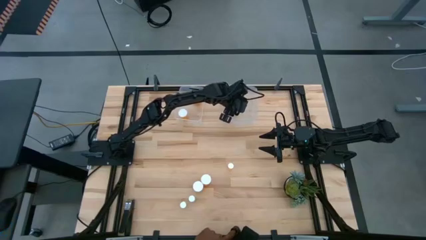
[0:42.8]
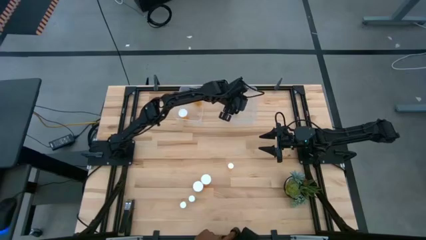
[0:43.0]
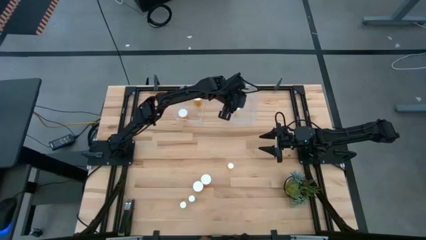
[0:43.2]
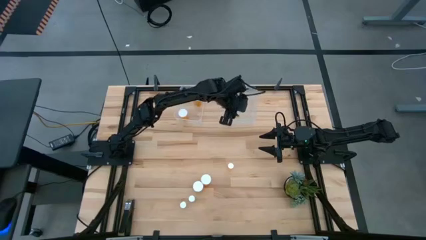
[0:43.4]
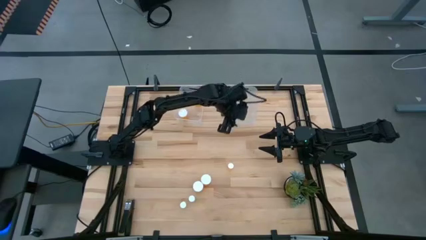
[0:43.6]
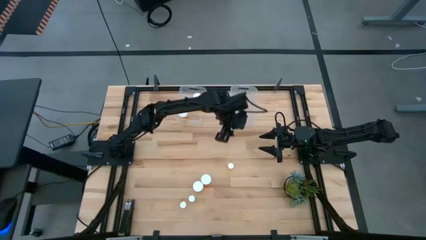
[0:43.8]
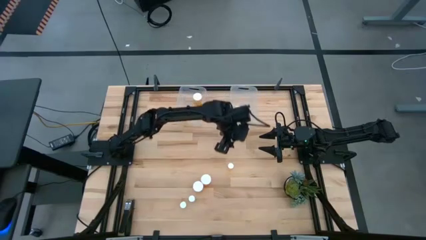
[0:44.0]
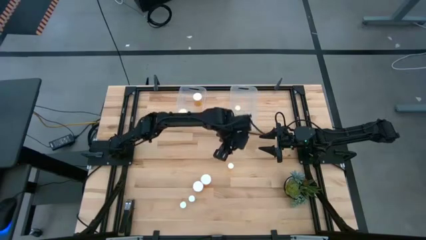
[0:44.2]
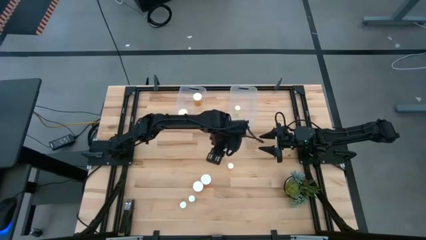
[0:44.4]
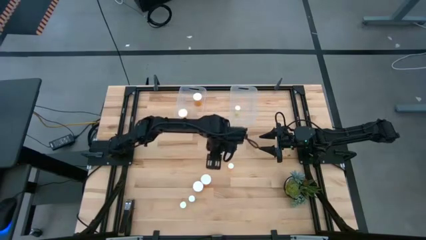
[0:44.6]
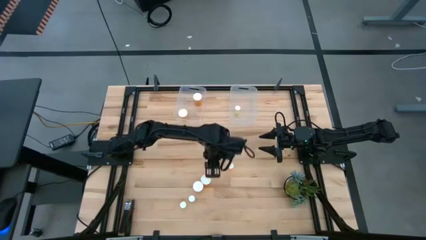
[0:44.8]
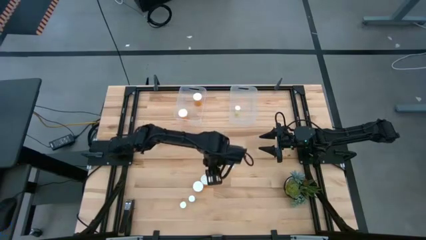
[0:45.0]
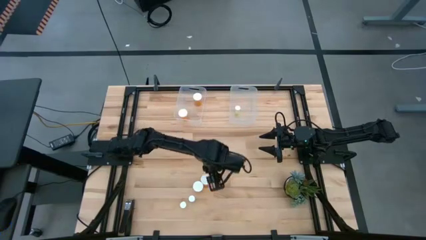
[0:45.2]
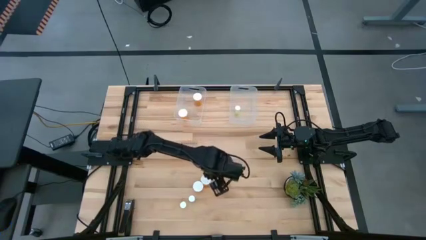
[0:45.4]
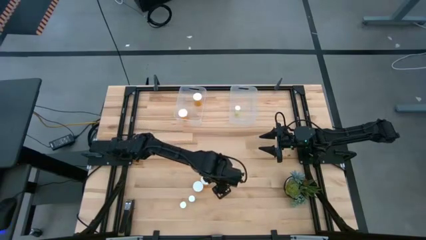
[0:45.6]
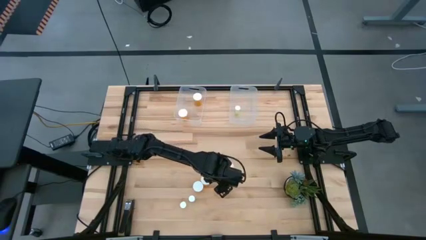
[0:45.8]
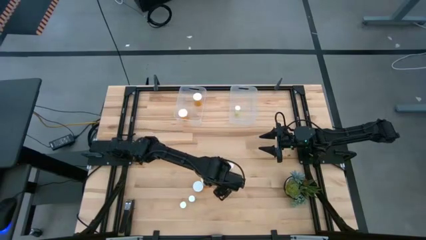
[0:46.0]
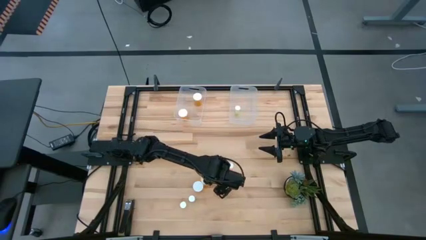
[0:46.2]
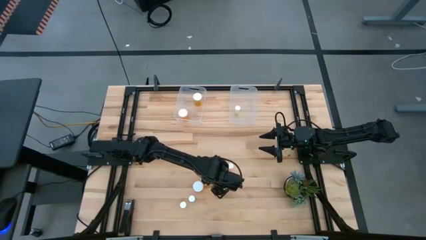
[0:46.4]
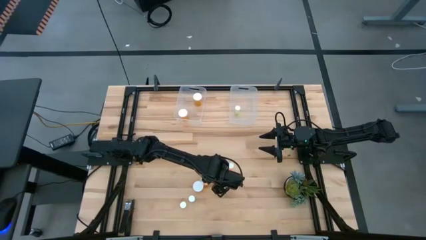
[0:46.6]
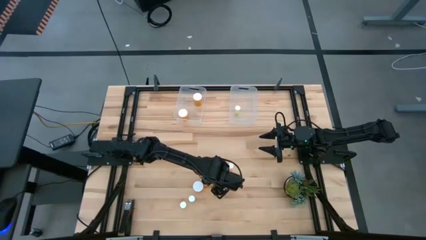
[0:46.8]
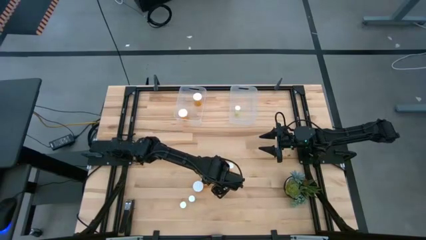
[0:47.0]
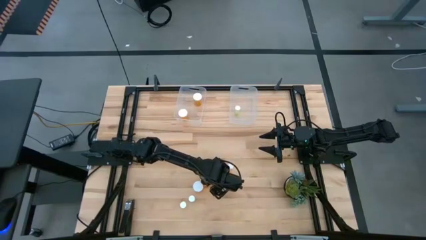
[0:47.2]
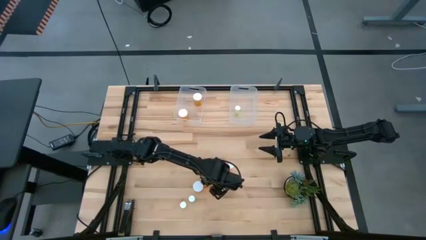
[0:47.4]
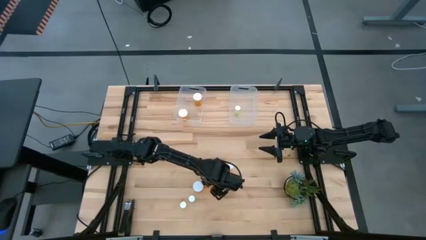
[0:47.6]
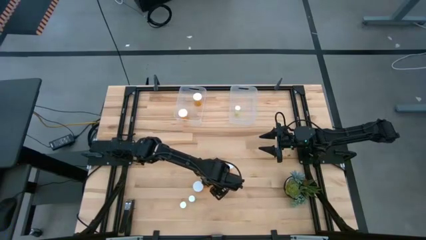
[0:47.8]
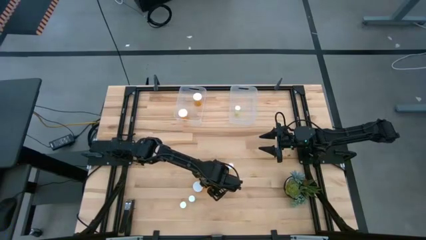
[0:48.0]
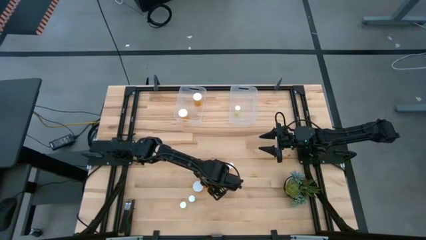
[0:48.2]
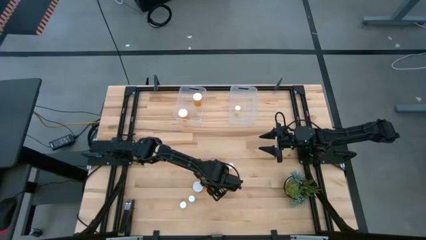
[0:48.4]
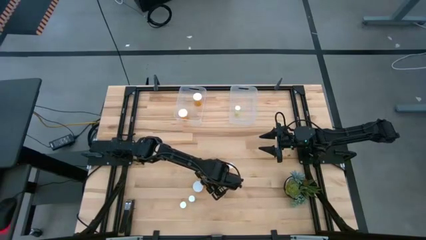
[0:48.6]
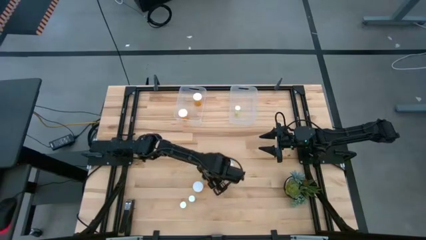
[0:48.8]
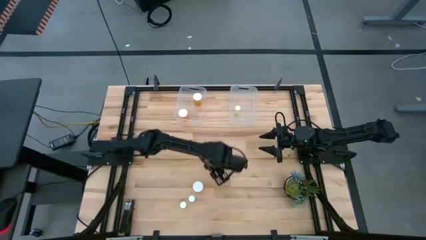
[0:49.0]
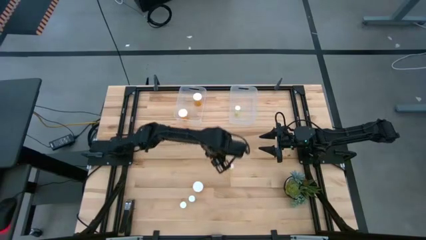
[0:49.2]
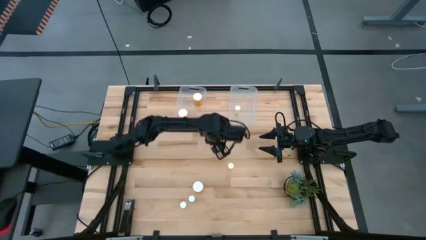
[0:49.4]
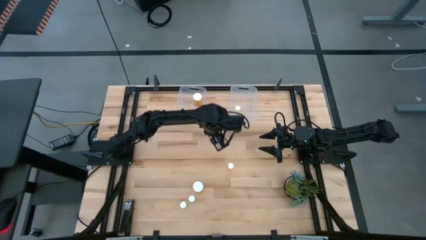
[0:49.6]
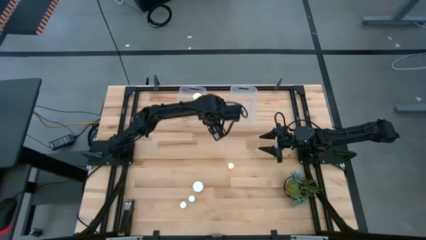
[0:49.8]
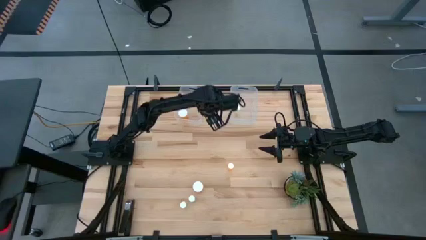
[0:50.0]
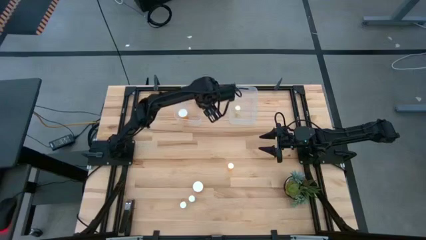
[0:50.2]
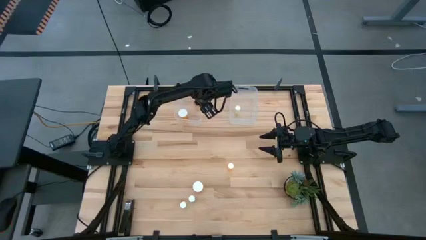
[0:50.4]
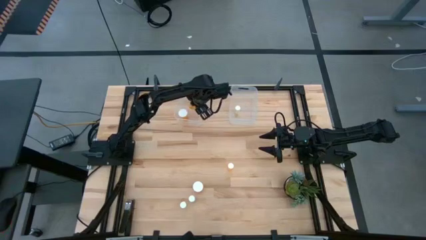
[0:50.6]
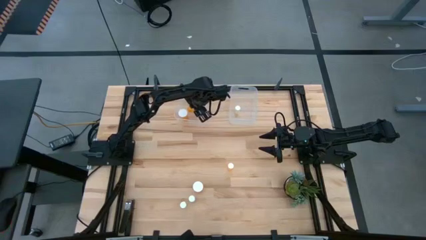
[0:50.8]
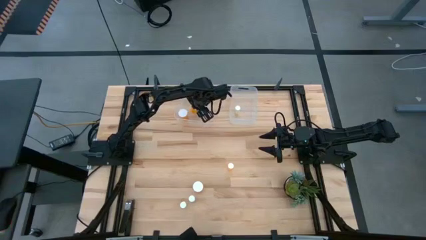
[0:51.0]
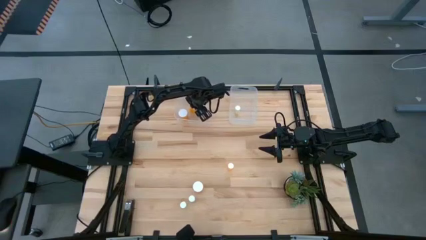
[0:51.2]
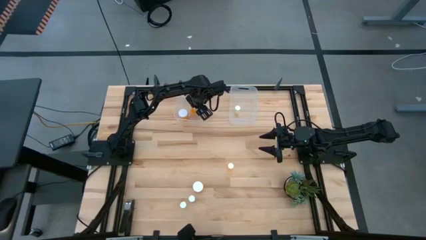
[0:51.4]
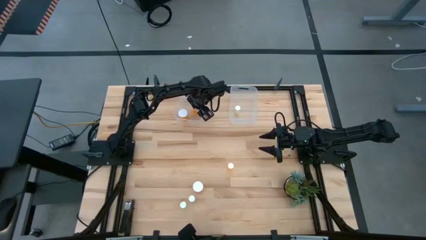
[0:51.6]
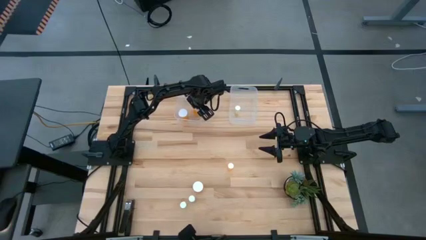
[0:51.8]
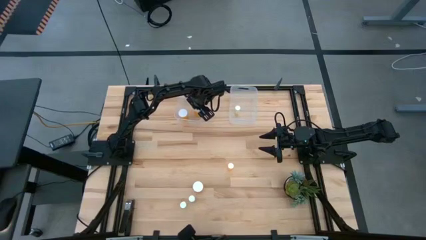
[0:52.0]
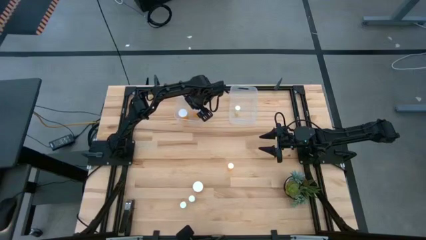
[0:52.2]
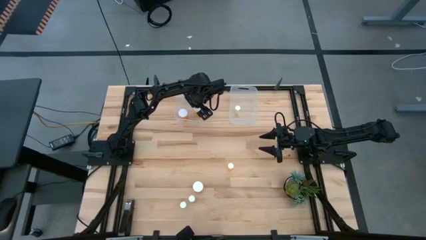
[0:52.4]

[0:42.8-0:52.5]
Task: Pick and place medicine bottles into bin by pill shape (circle, oval)
Put the big orange pill bottle into the left transparent bin

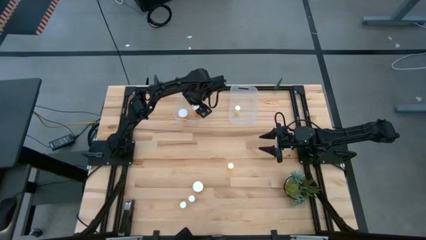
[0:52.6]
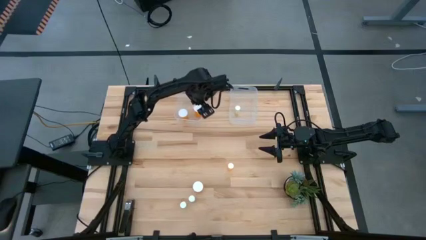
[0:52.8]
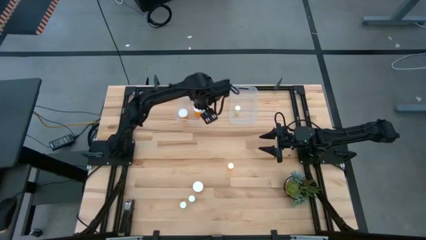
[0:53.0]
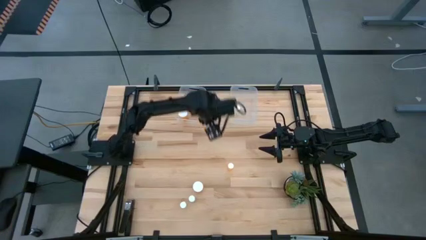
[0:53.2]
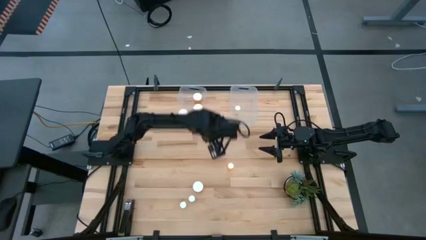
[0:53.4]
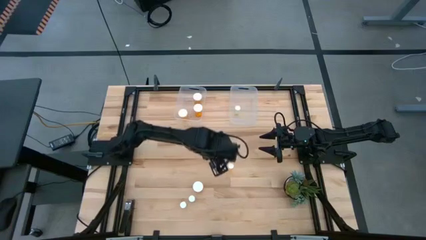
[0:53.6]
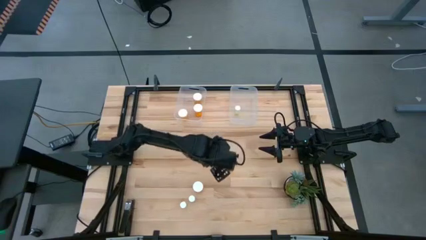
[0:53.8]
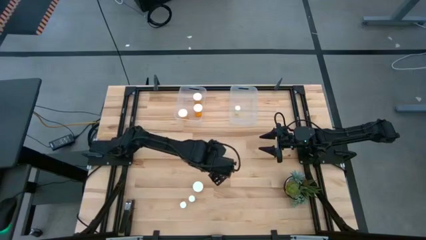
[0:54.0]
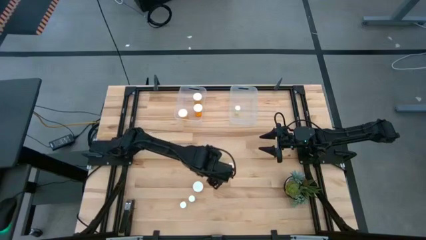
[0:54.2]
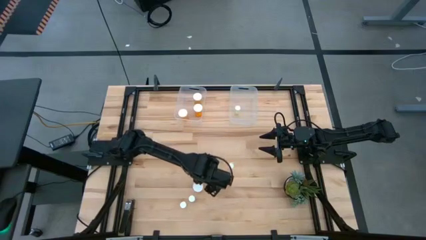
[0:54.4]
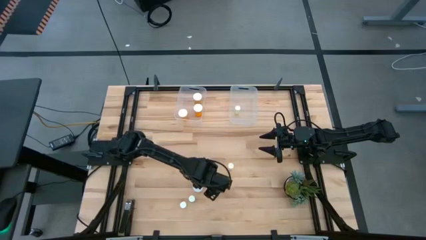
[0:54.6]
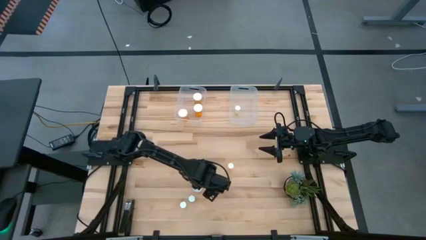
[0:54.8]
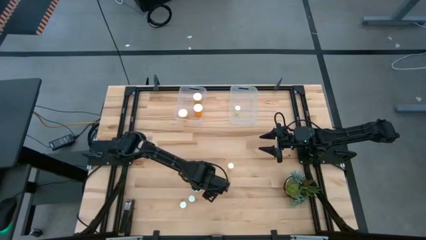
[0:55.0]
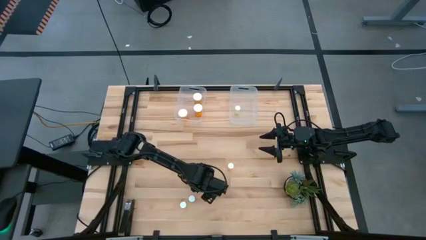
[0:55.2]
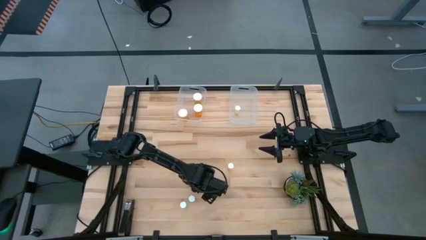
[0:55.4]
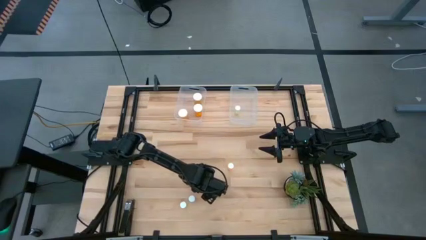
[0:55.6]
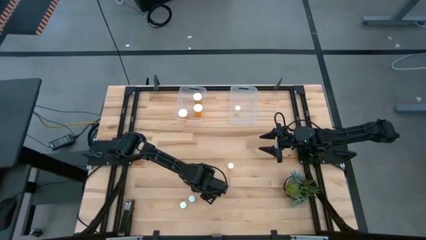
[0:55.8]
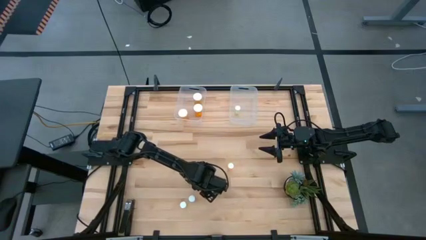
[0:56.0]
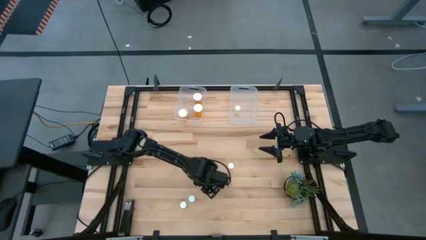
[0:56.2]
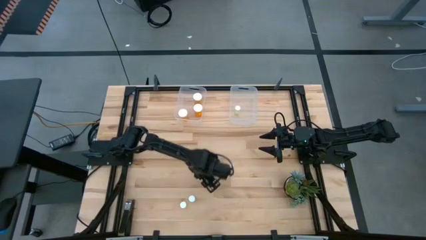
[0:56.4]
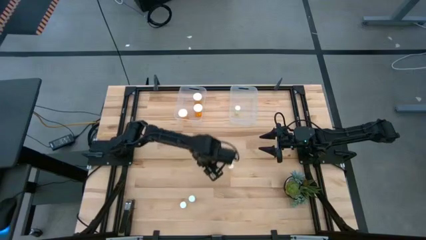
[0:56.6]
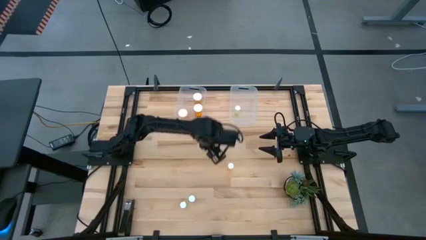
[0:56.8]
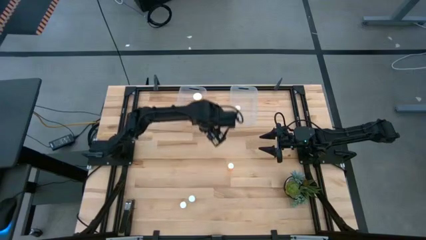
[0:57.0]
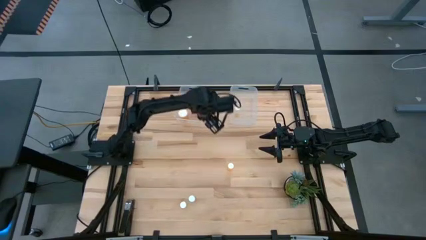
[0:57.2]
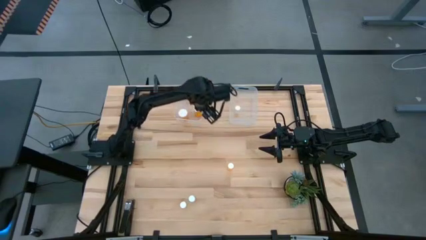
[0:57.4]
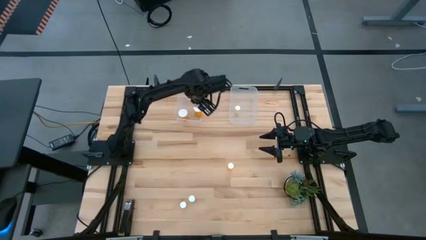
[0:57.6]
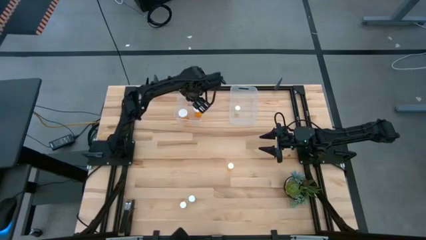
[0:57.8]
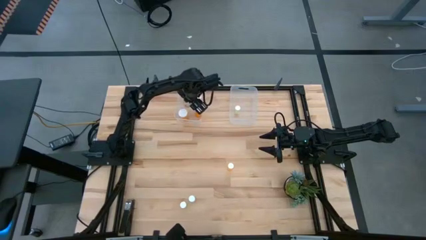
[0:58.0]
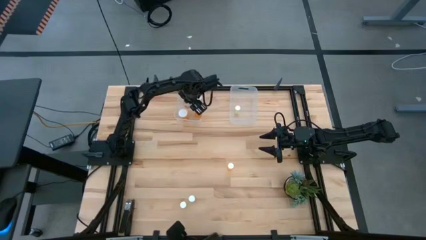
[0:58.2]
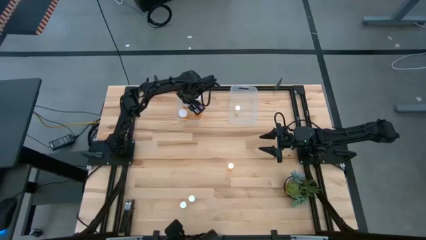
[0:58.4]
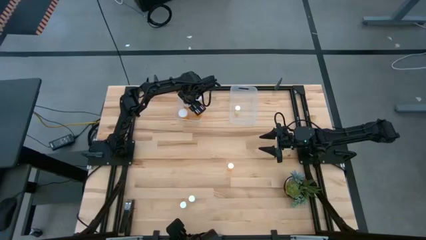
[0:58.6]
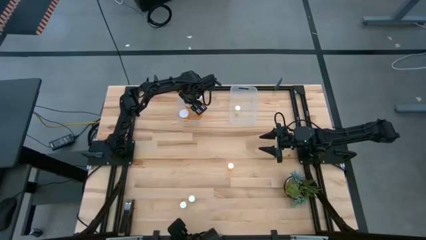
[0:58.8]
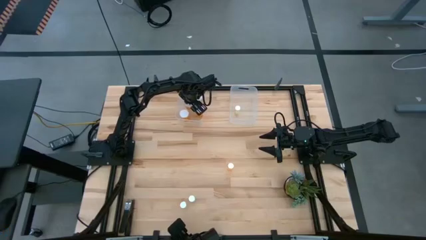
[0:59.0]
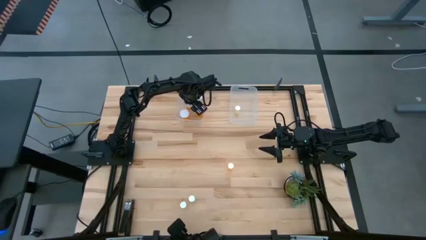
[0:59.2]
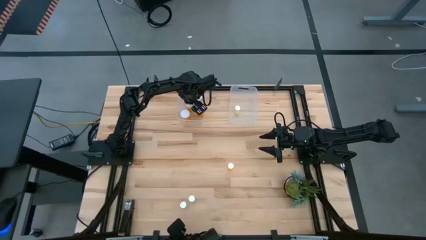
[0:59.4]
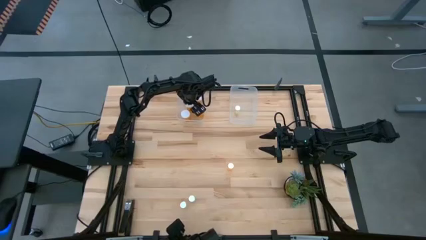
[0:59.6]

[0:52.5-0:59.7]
Put the big orange pill bottle into the left transparent bin
